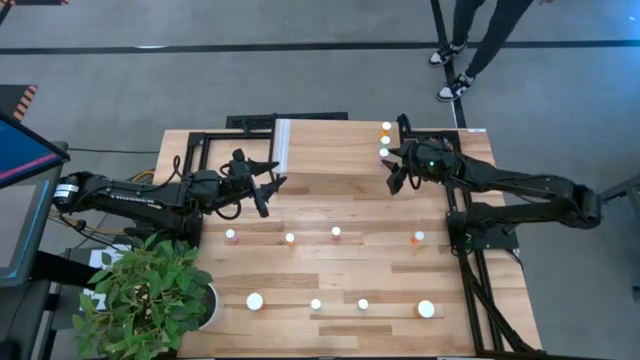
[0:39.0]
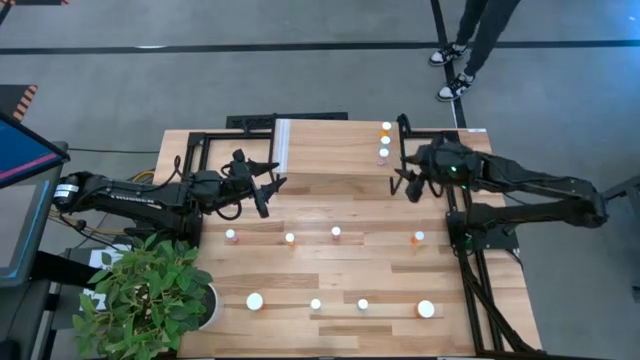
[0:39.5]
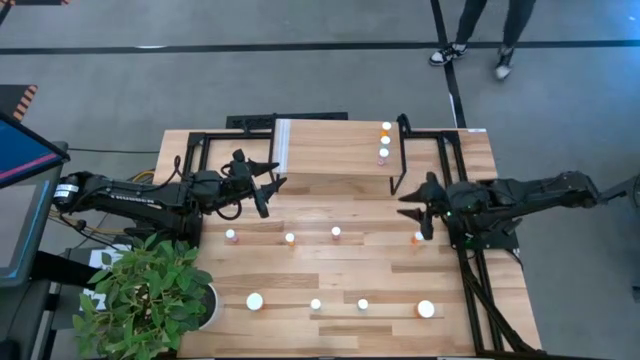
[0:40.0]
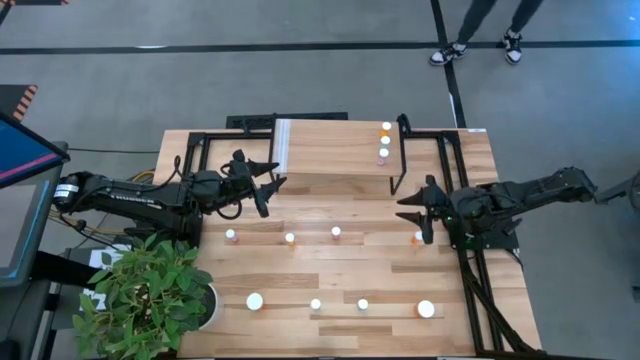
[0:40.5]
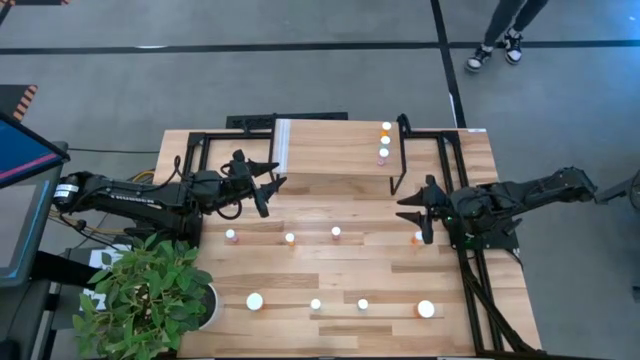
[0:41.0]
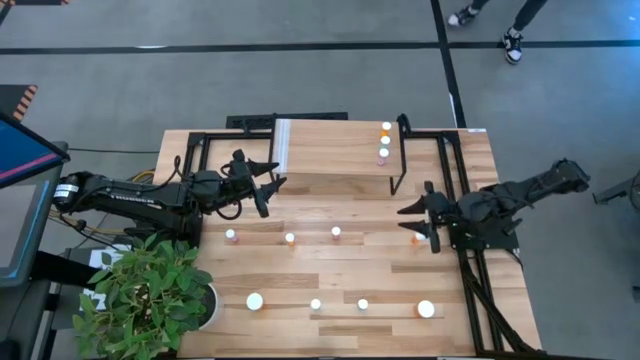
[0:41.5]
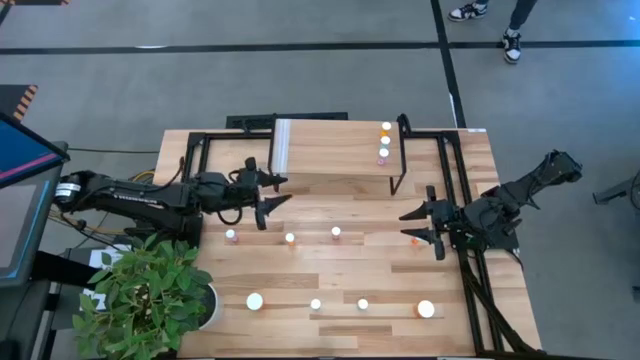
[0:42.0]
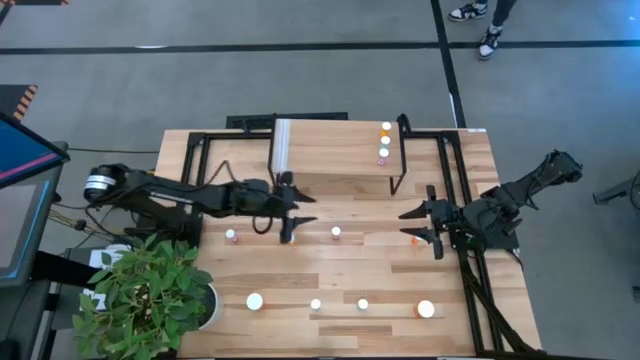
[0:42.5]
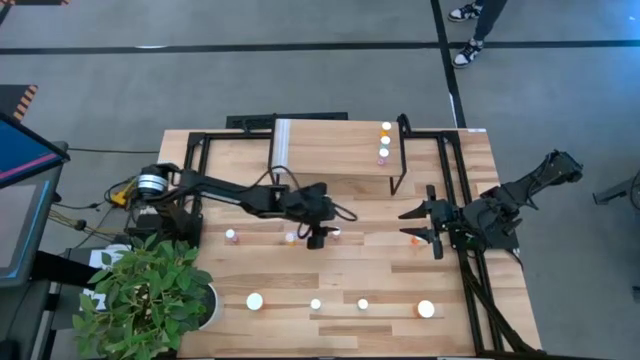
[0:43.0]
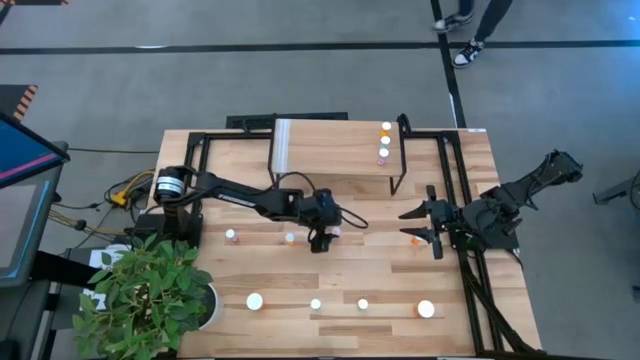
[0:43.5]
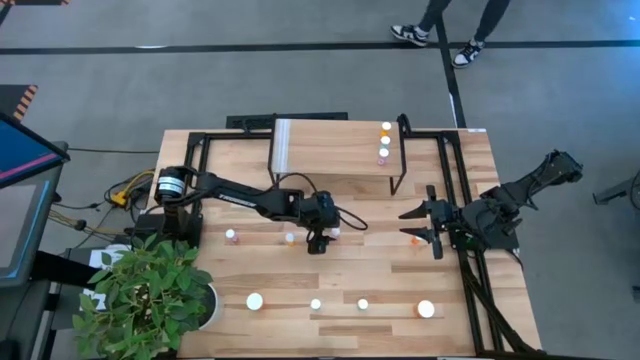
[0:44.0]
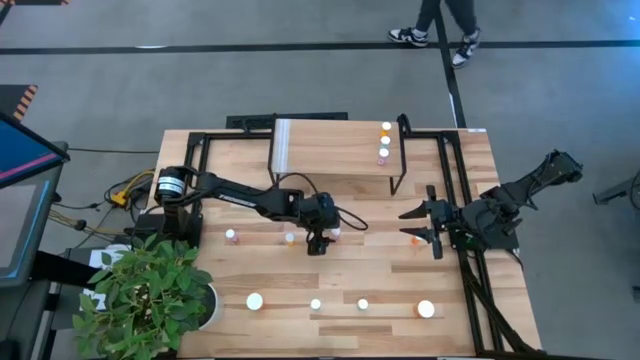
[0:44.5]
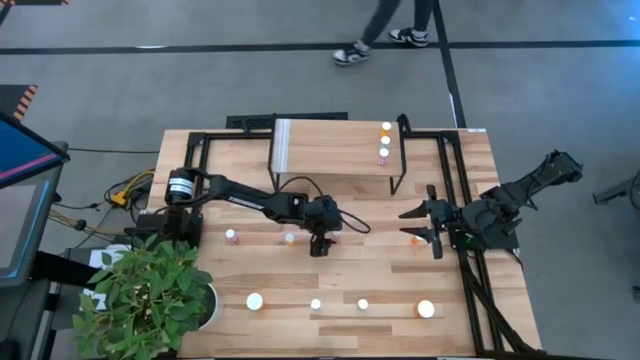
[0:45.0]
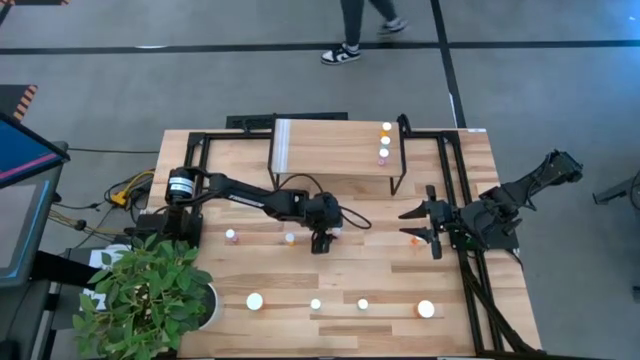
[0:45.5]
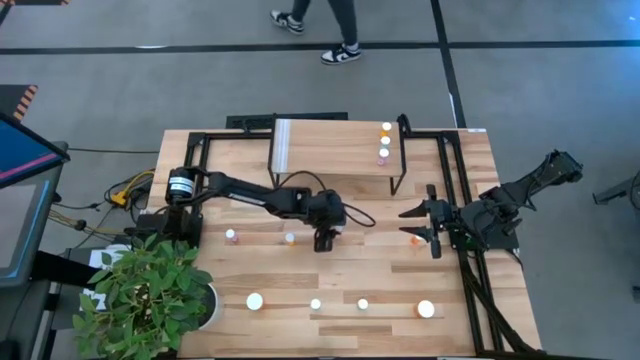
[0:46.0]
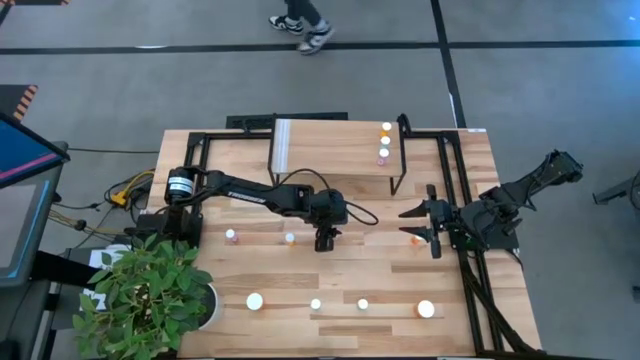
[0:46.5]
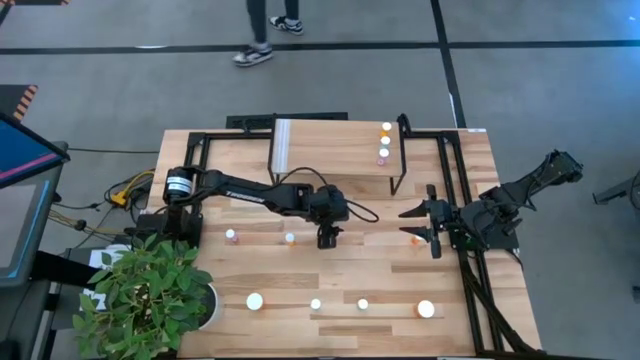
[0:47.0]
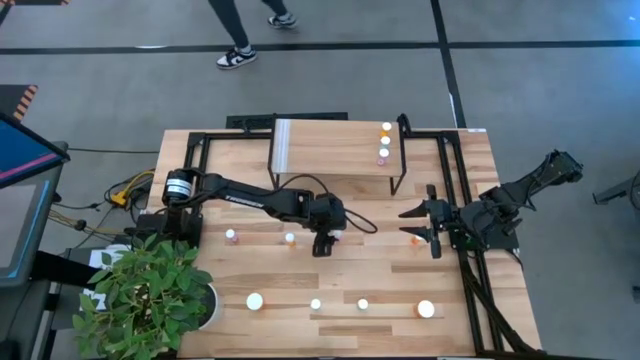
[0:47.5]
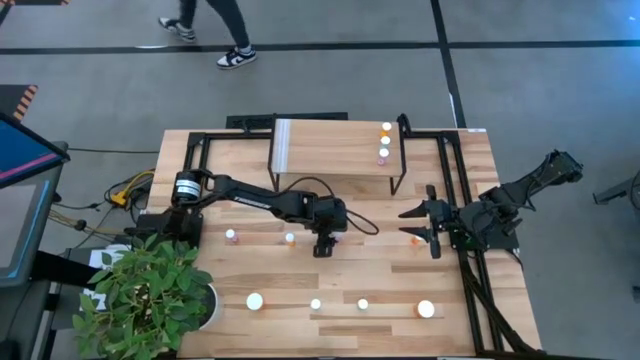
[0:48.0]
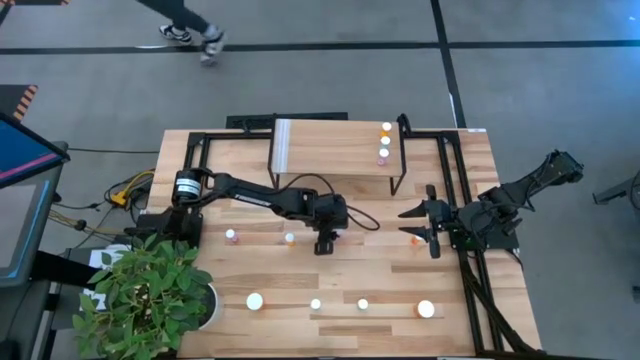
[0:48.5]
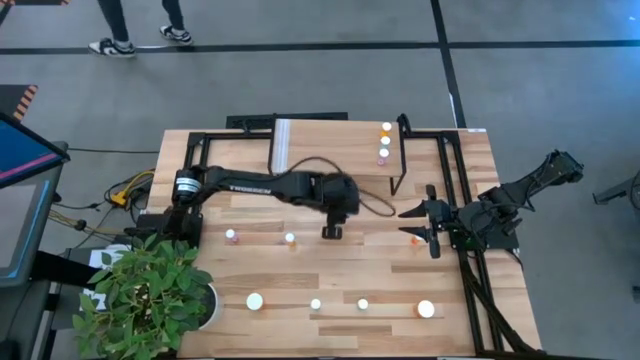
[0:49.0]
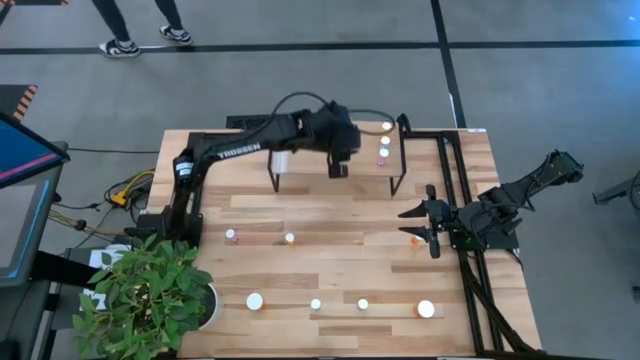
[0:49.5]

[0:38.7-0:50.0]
Task: Pick and place medicine bottles onto shelf by color
Put the right pink pill bottle on the shelf

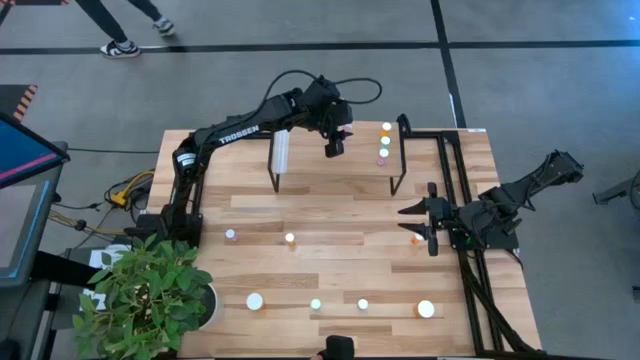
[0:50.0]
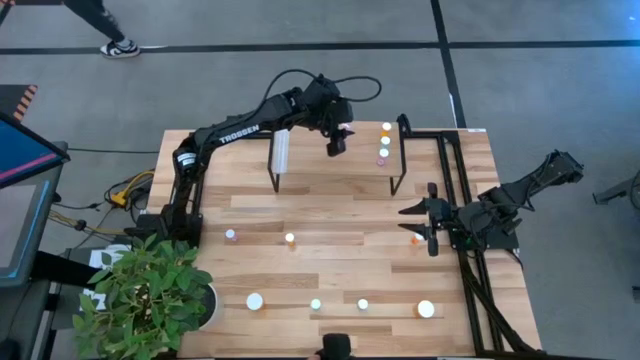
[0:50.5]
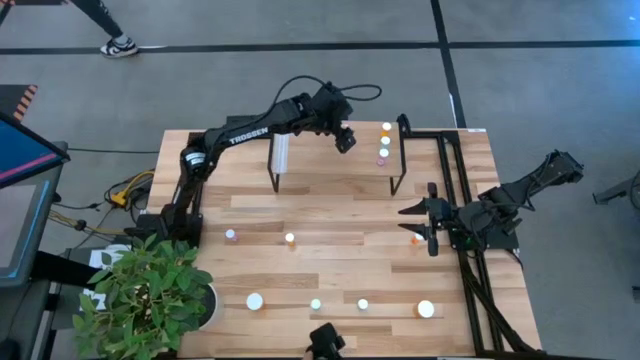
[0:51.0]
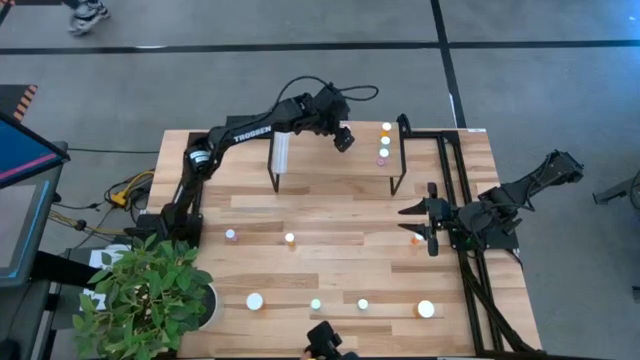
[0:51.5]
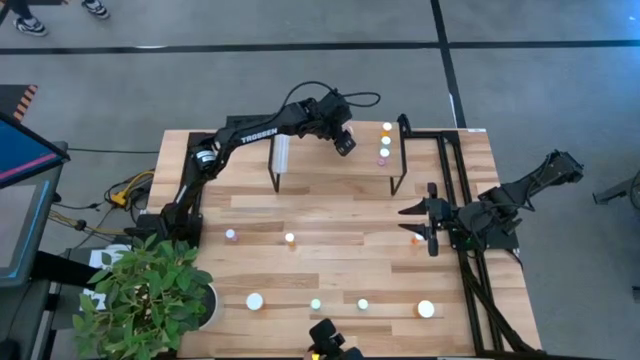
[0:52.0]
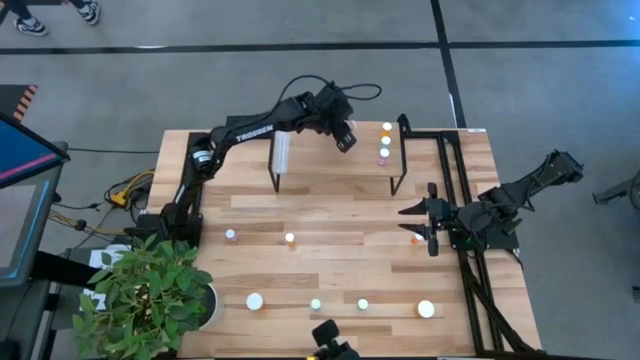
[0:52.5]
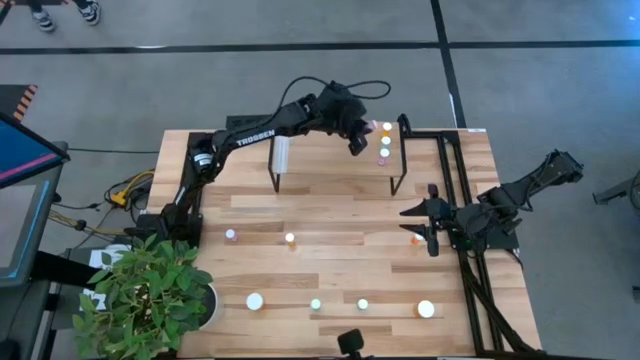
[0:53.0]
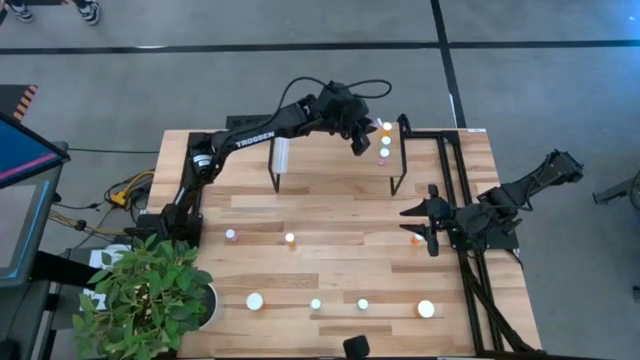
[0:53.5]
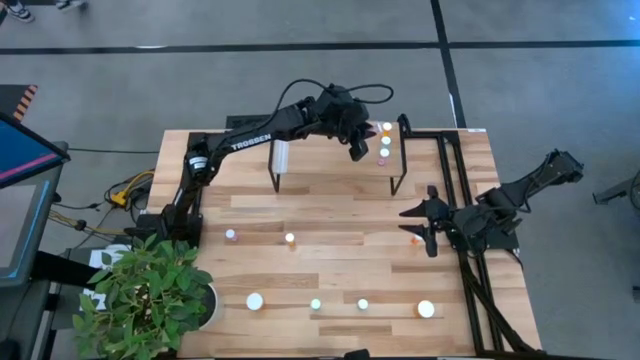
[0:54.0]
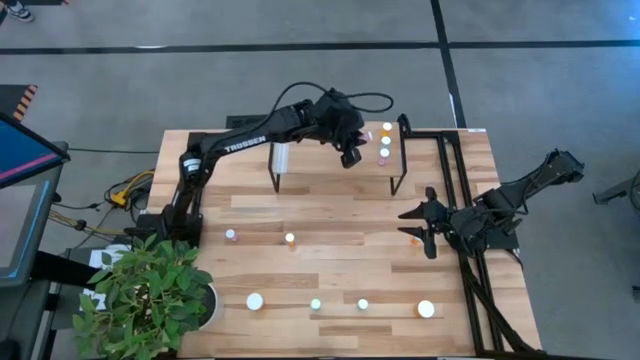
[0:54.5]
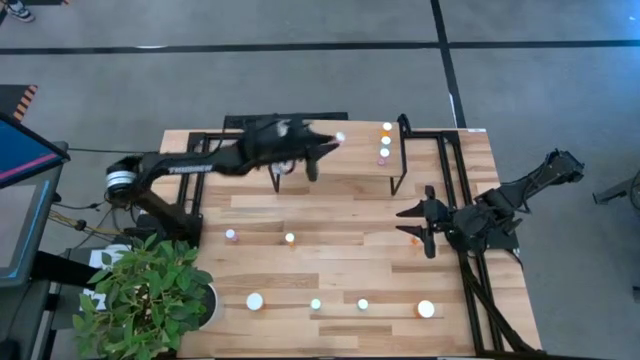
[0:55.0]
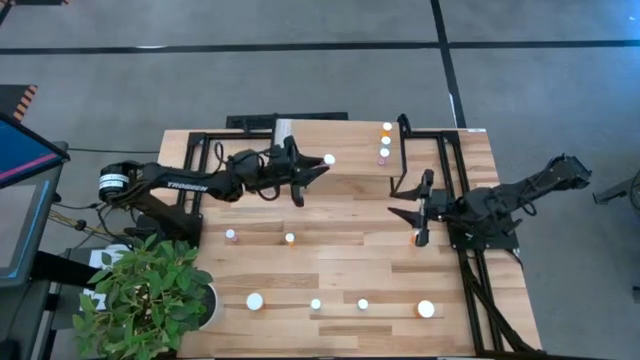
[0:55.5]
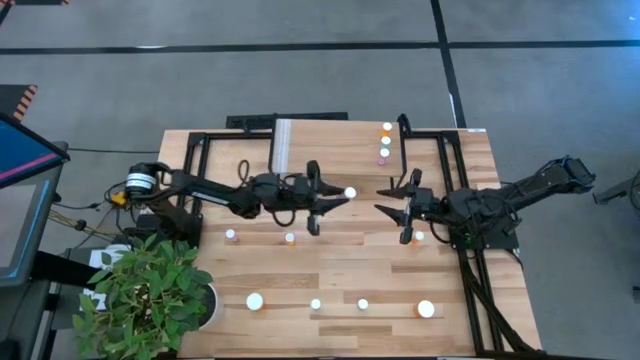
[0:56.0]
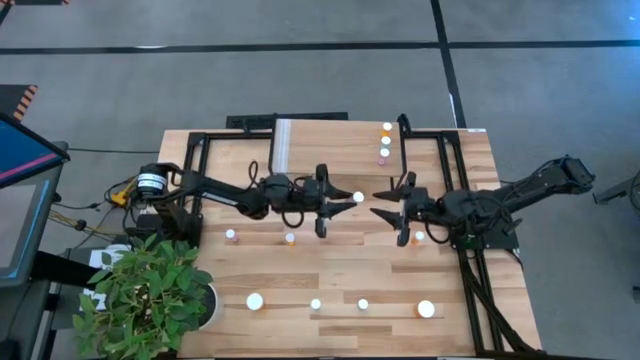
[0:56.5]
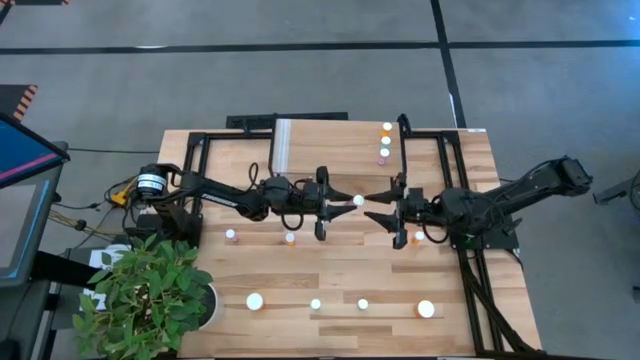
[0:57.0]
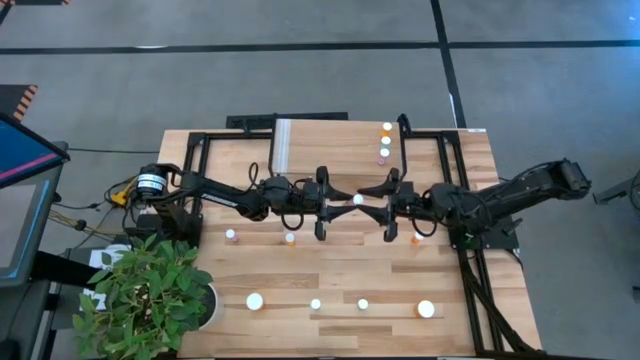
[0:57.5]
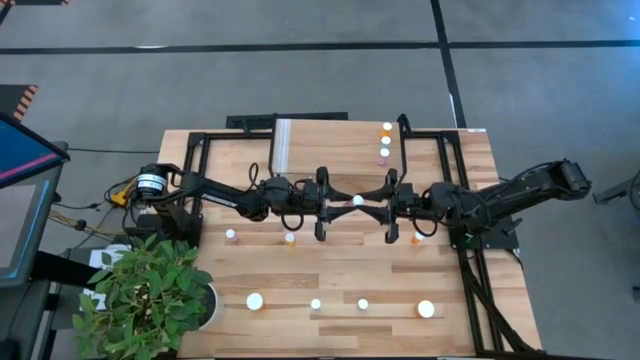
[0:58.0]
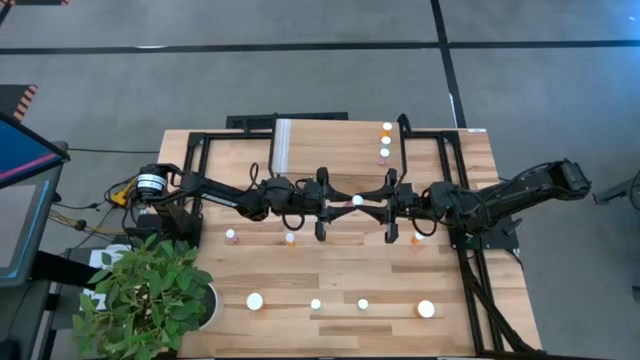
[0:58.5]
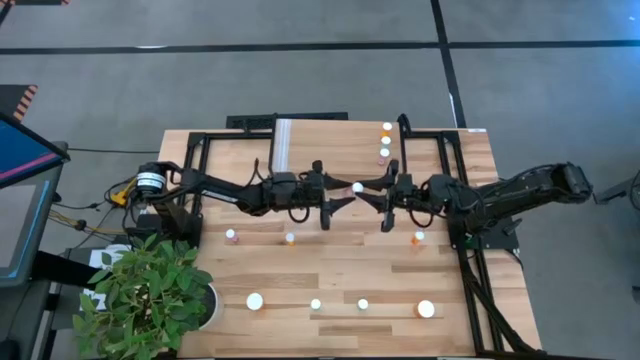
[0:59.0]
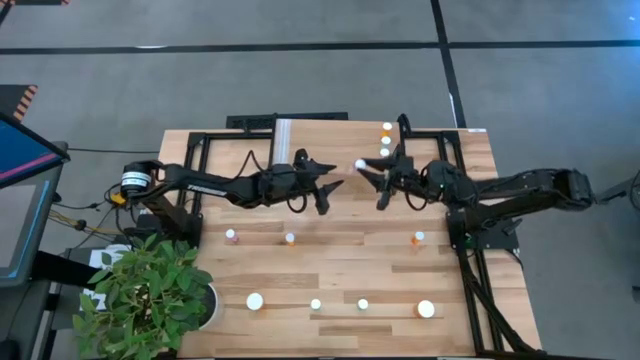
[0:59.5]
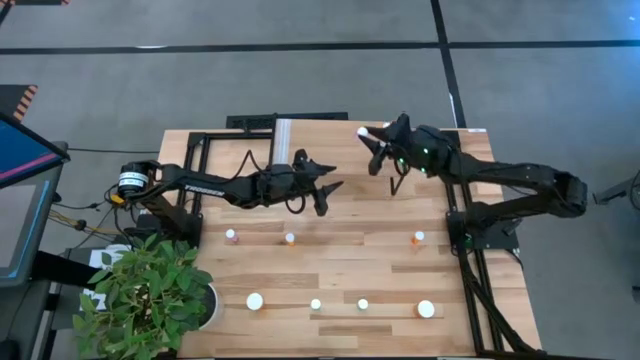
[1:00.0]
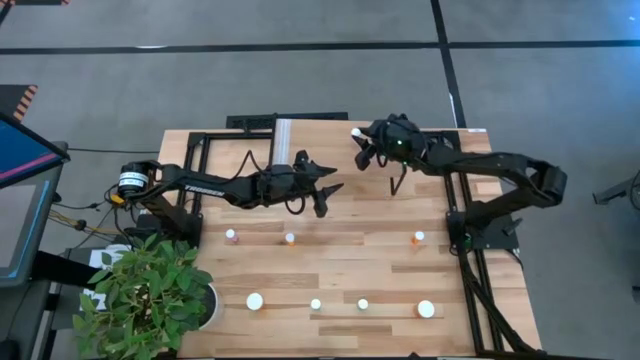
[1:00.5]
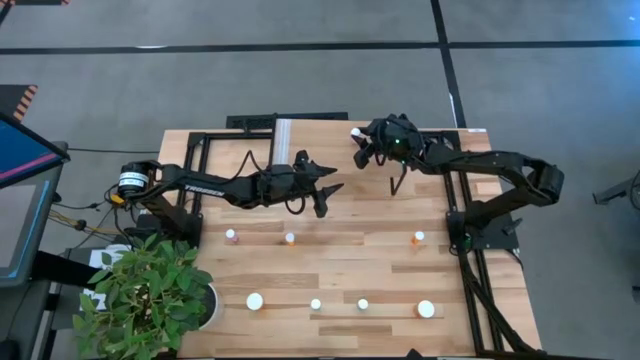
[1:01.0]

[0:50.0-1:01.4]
Put the right pink pill bottle on the shelf
